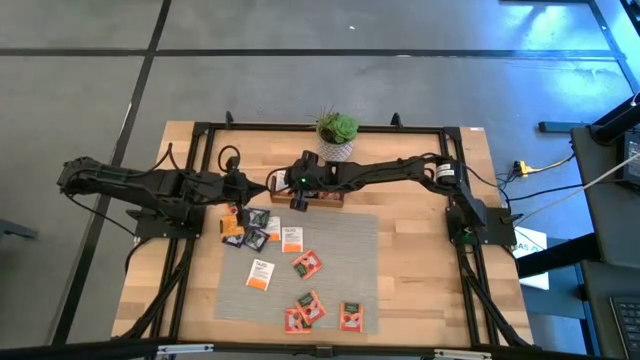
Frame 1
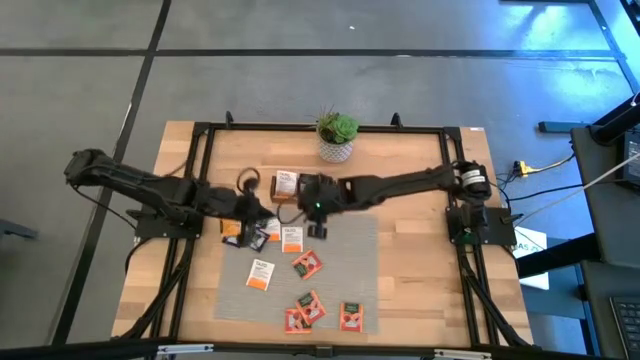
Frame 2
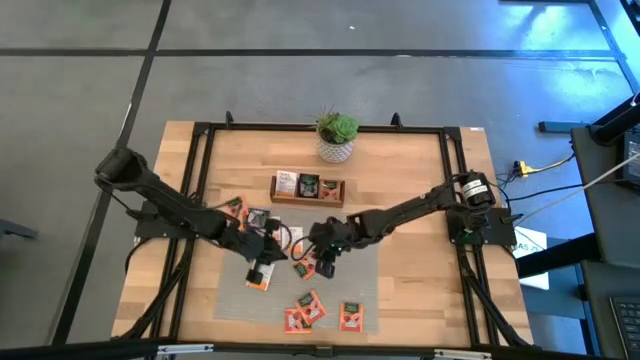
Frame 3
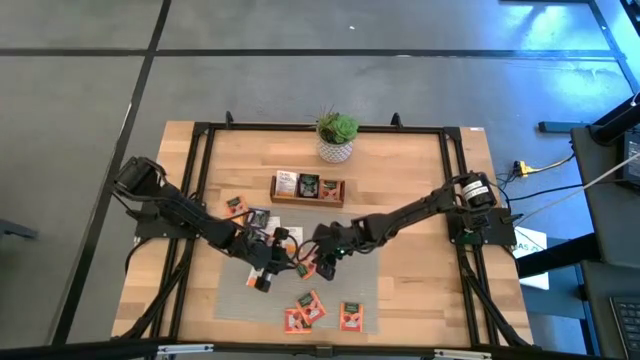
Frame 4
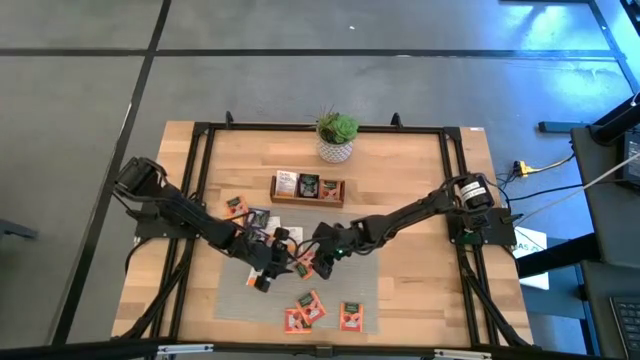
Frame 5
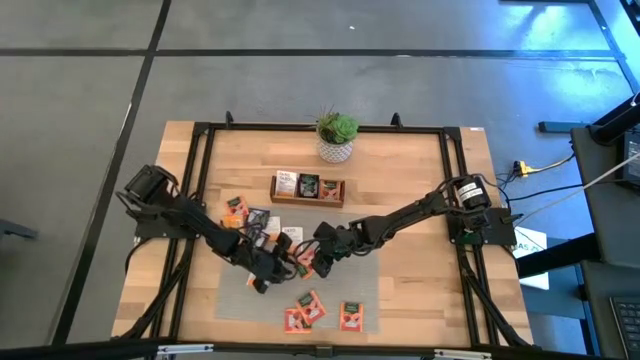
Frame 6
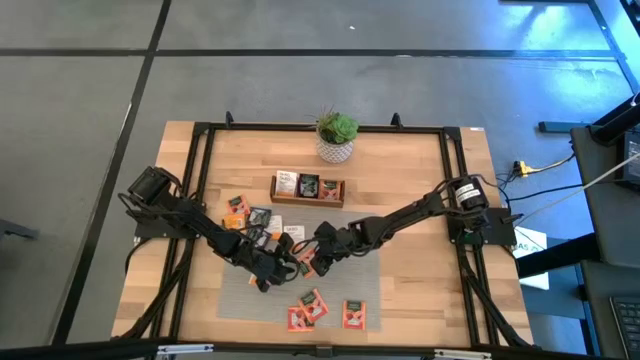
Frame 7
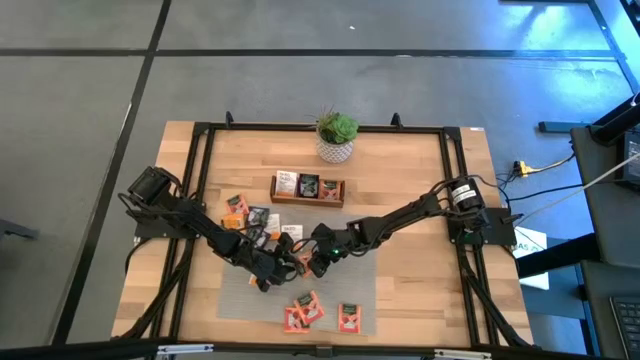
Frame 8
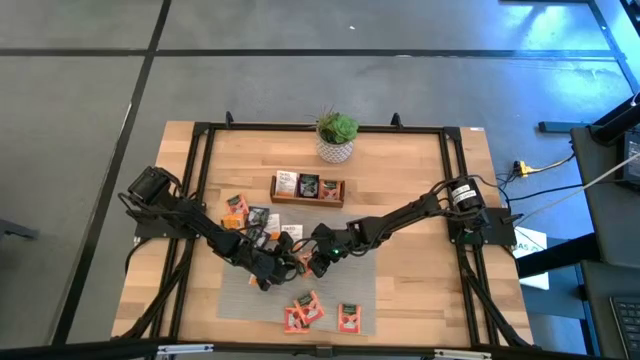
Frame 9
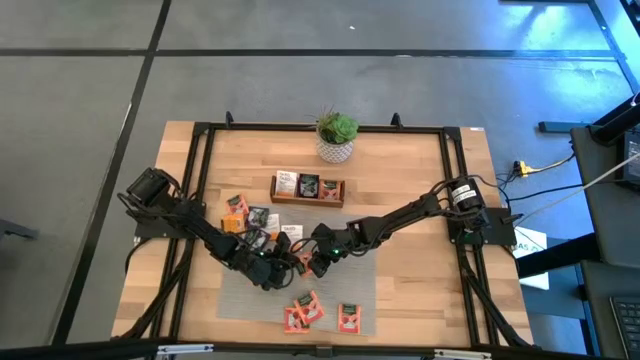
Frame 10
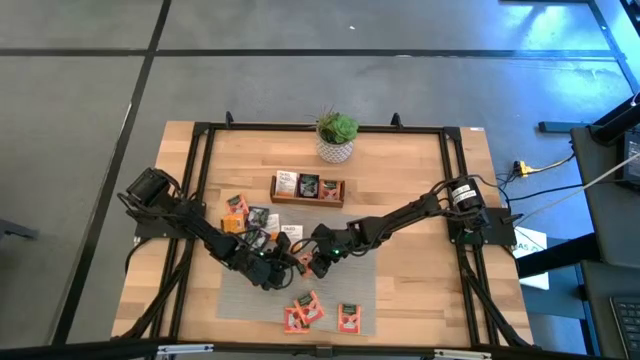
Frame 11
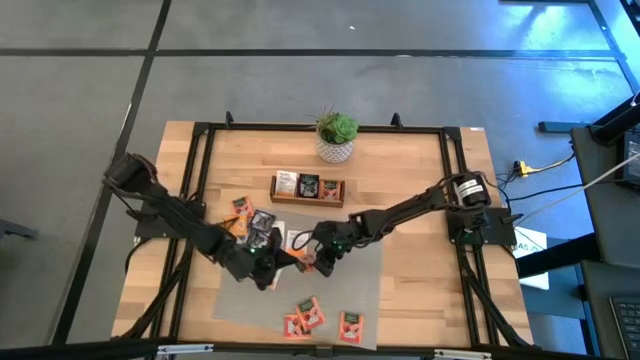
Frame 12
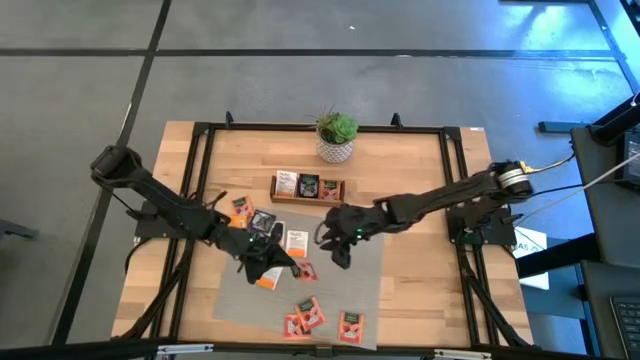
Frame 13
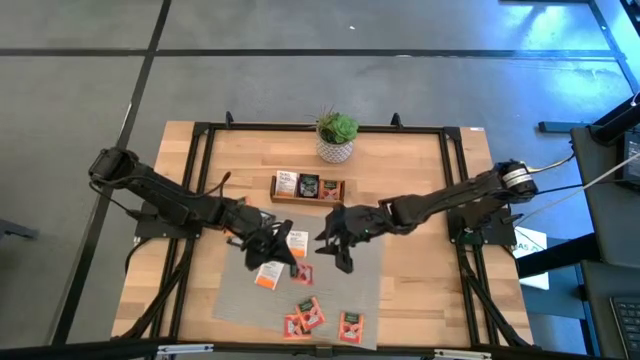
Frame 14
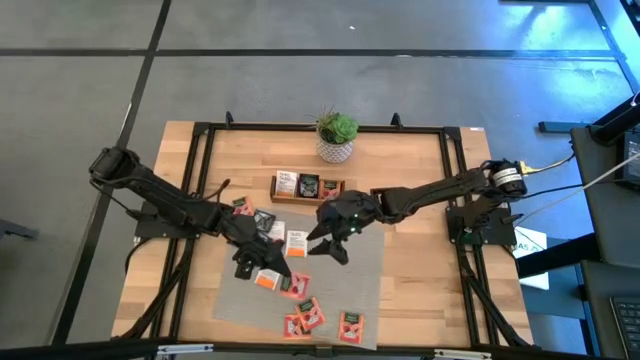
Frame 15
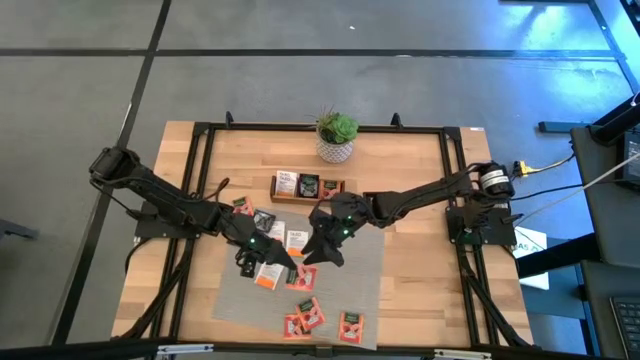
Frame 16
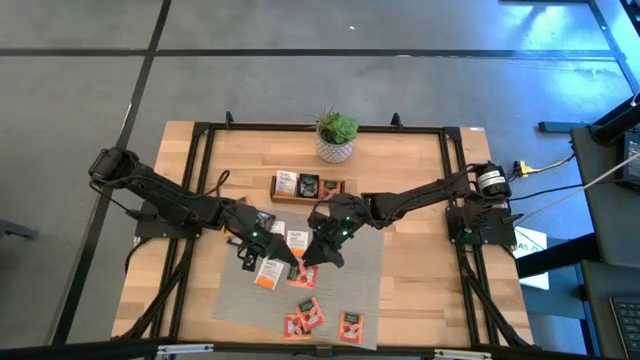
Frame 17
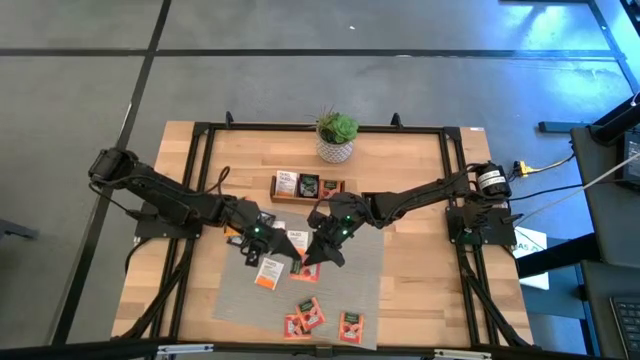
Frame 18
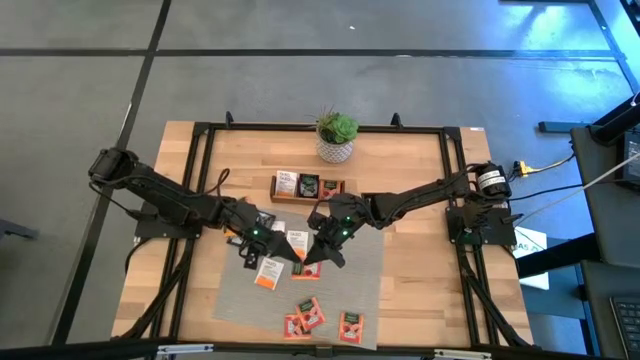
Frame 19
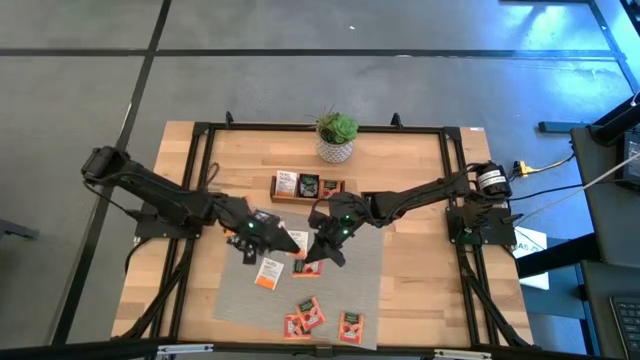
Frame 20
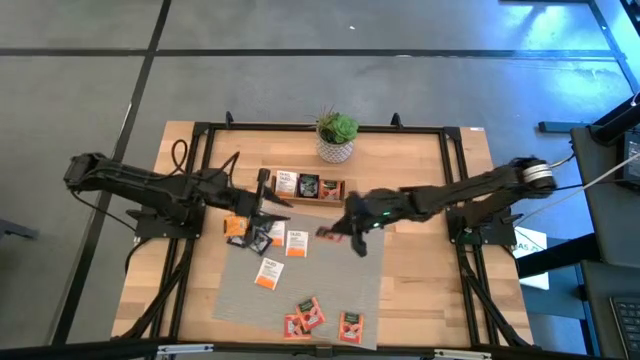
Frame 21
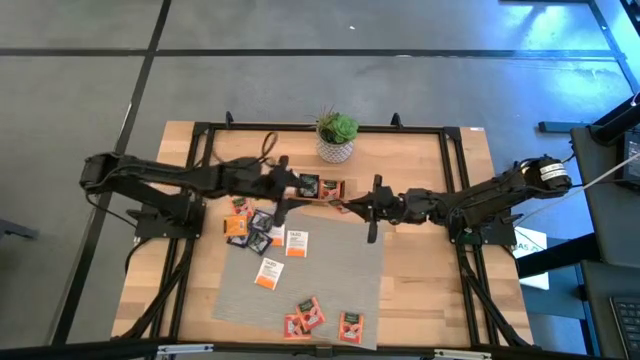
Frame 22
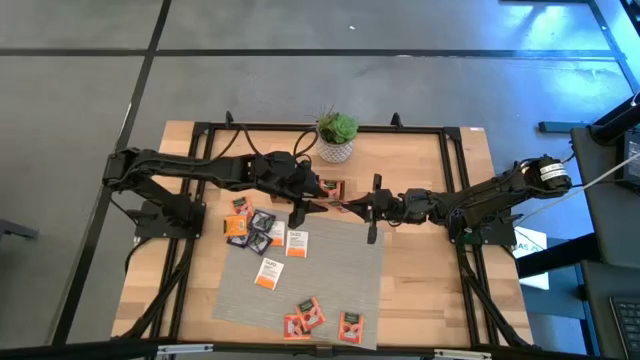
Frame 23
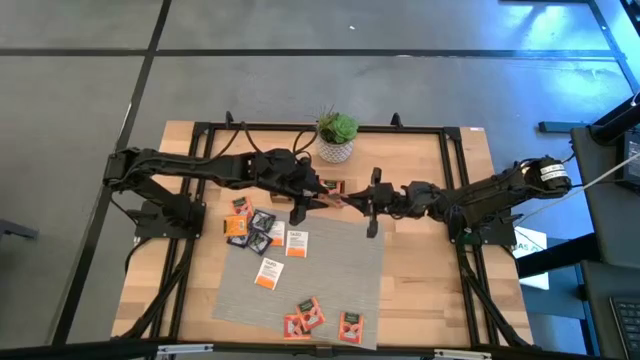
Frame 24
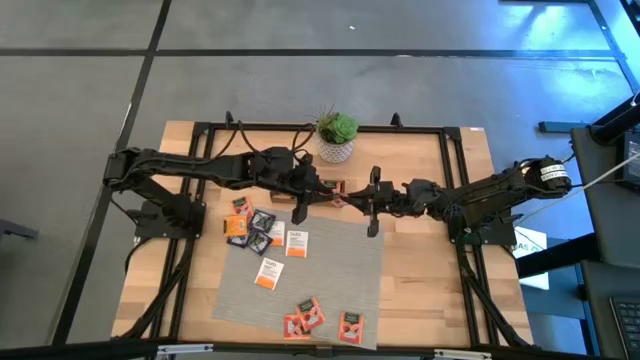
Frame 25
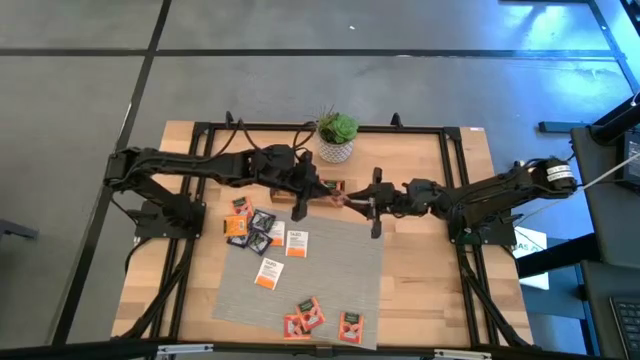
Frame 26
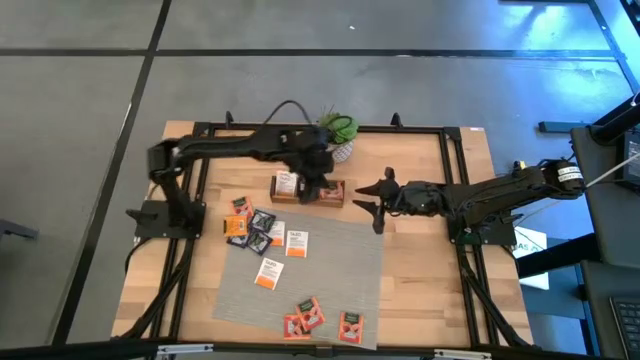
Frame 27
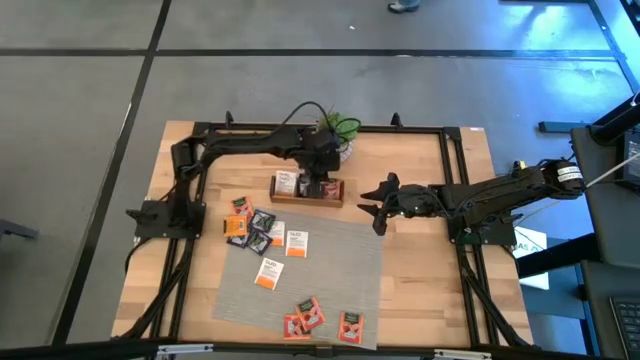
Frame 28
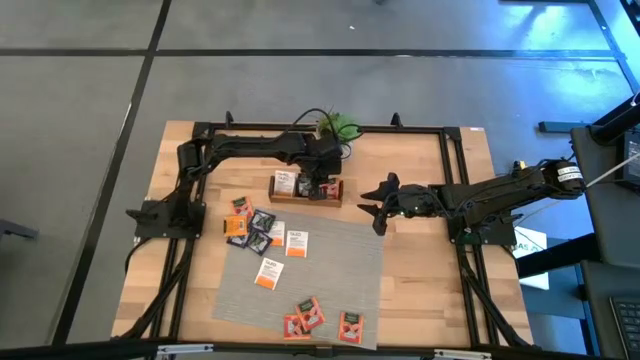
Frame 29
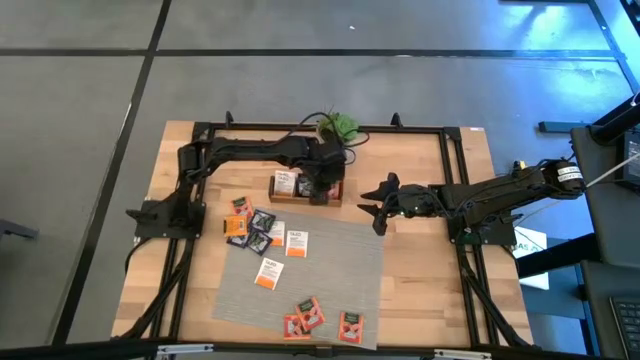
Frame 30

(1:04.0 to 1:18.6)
Task: Pick & Place Tea
Put the orange tea bag into the right section of the wooden organizer

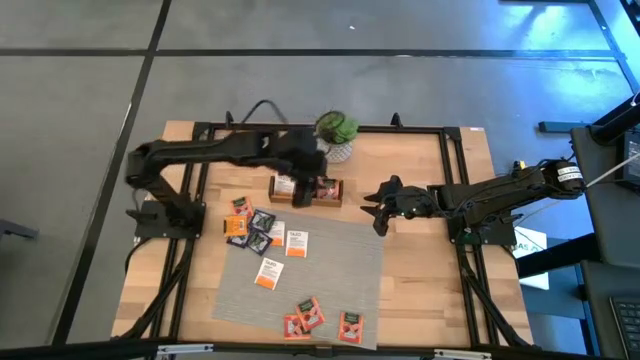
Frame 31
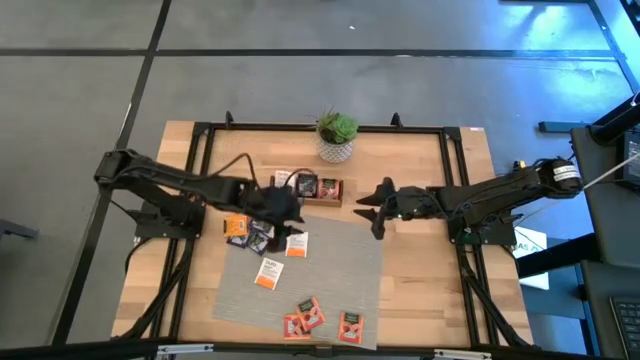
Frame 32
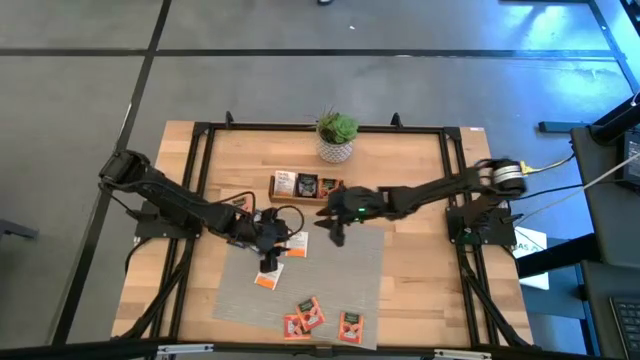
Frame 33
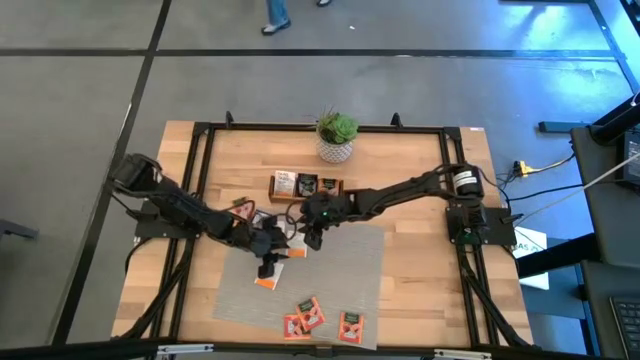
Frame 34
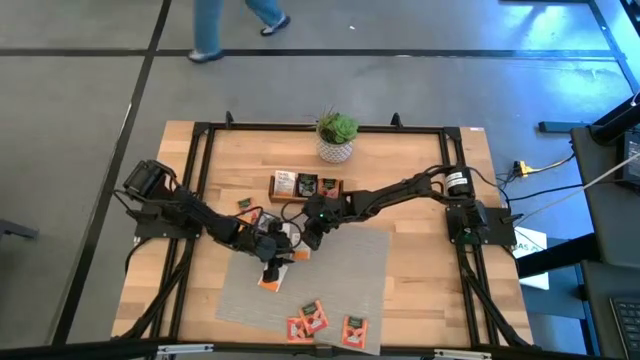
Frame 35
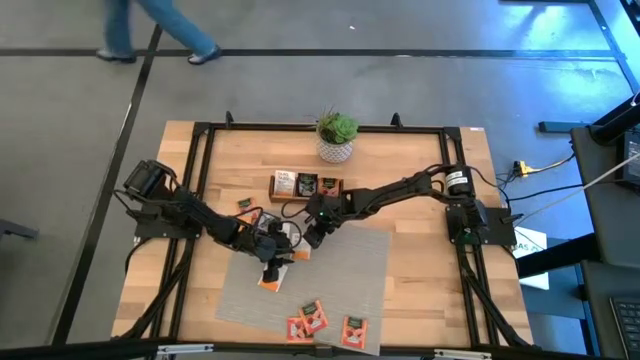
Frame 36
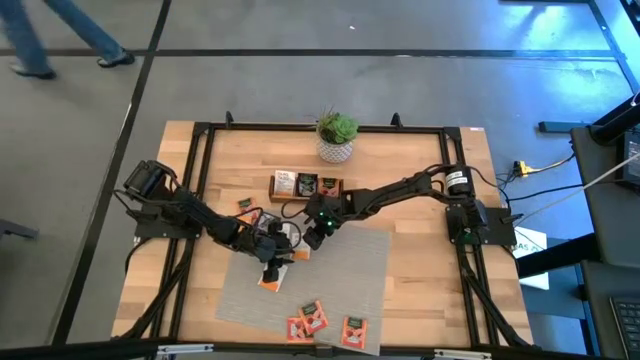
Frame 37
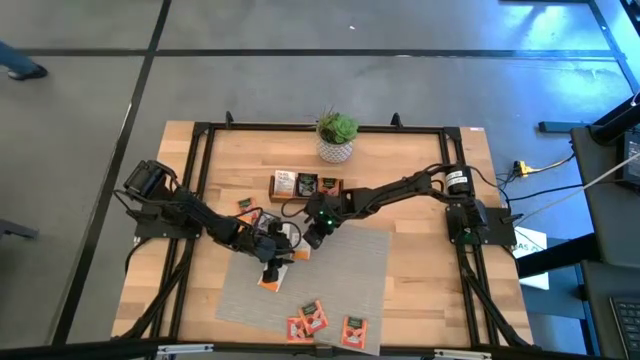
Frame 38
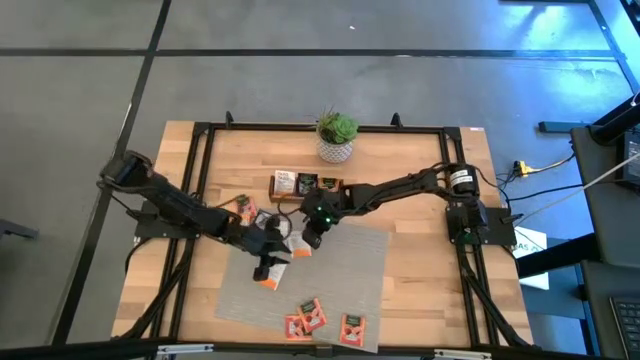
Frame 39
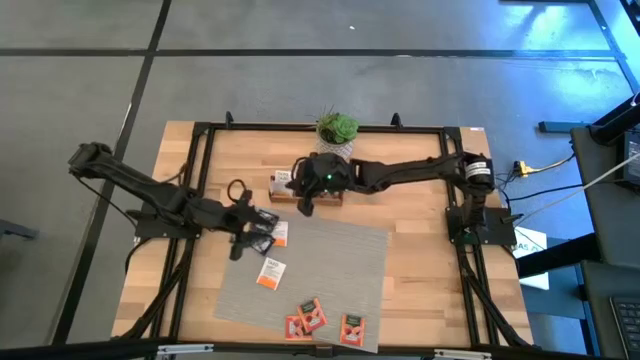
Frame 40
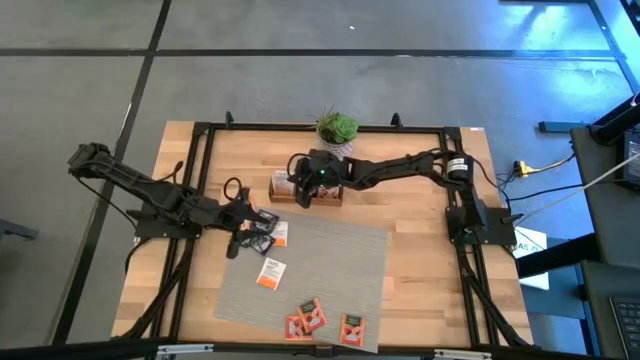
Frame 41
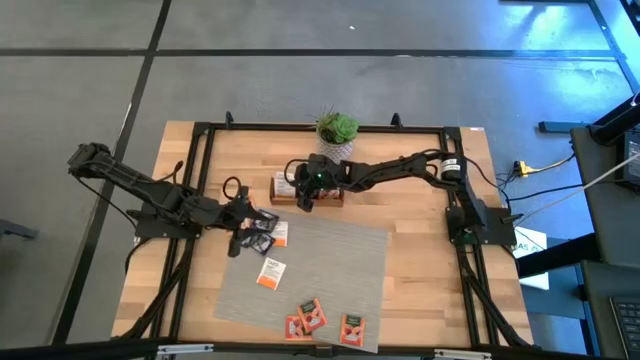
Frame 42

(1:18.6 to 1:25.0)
Put the white tea bag into the left section of the wooden organizer
